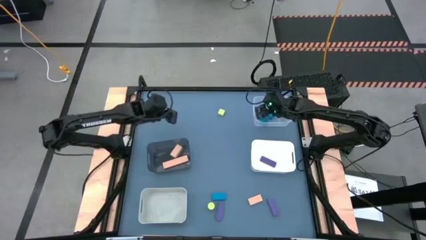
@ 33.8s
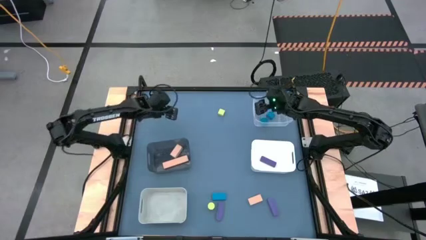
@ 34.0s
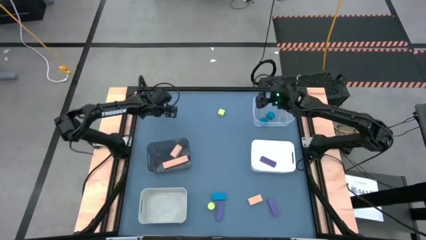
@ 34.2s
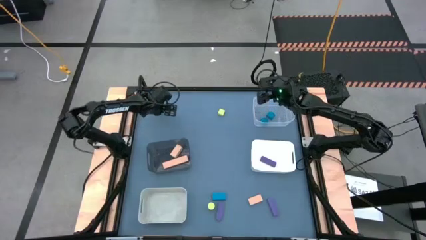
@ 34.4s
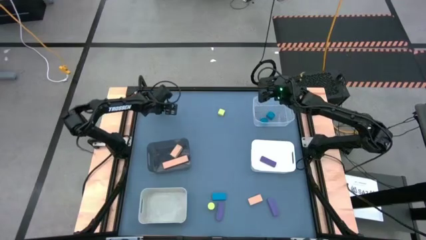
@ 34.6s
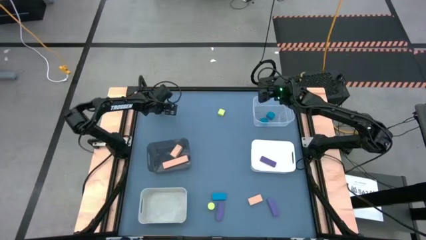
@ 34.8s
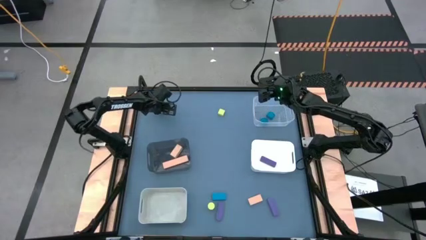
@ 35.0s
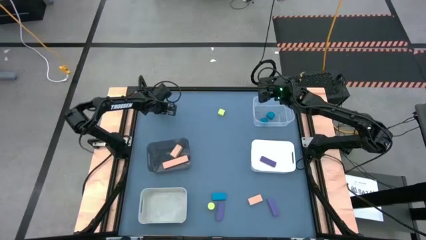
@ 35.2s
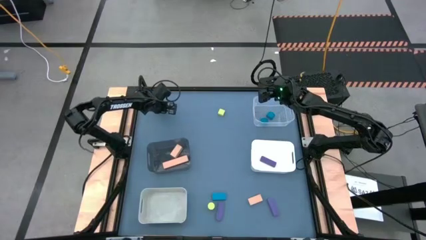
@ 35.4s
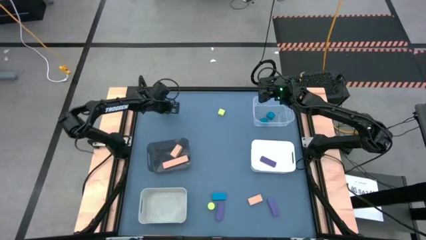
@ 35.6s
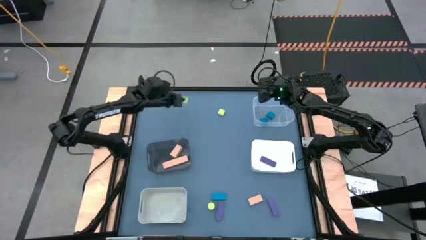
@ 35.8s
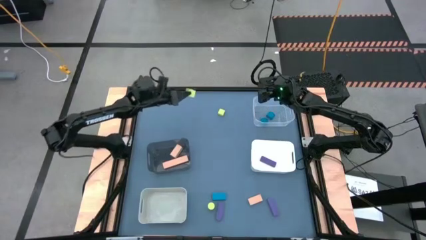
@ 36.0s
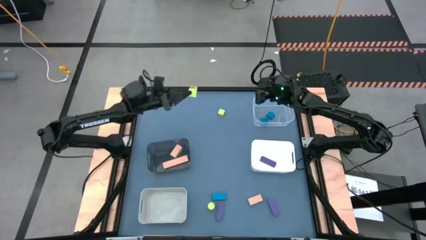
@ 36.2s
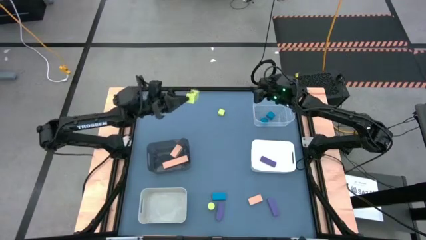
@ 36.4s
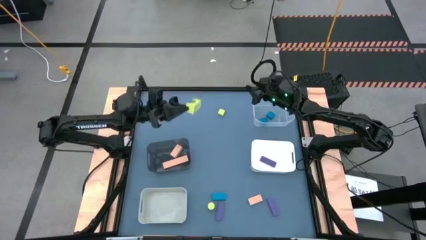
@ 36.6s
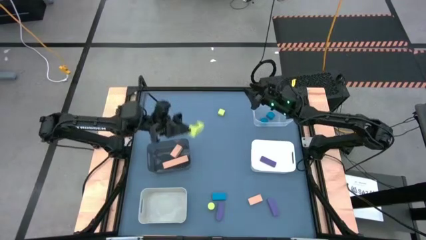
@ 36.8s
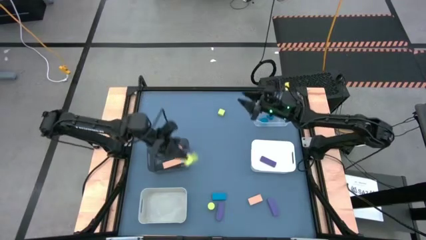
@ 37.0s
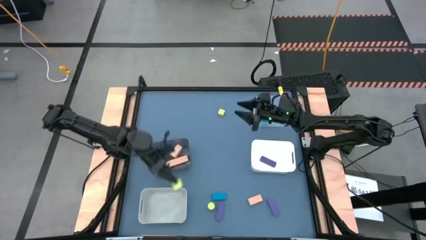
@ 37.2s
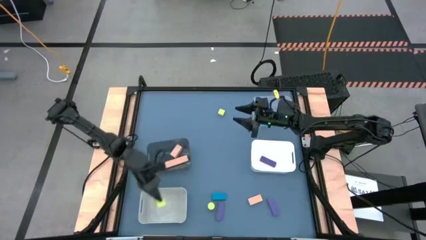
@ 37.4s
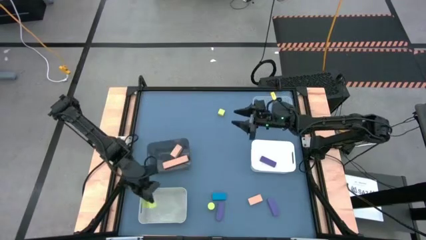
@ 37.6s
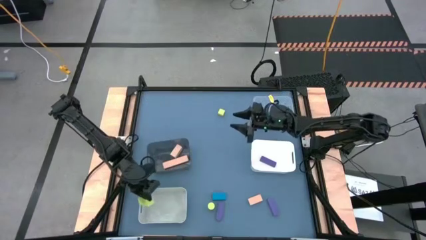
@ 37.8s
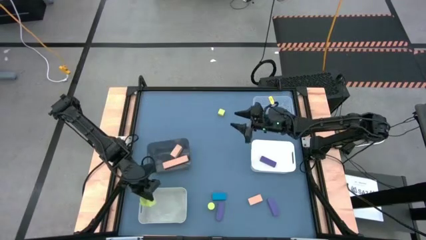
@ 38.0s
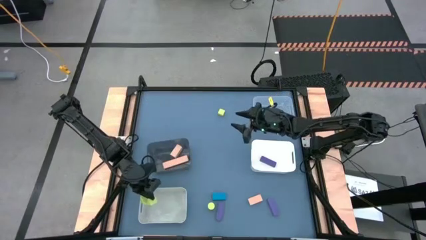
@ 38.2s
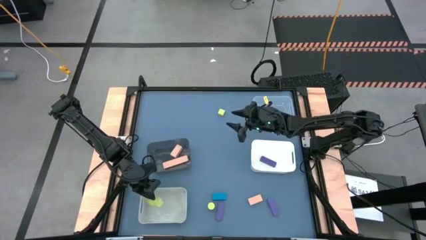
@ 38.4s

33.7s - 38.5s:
Task: Sort & place blocks by color
Put the top left yellow block into the gray bin

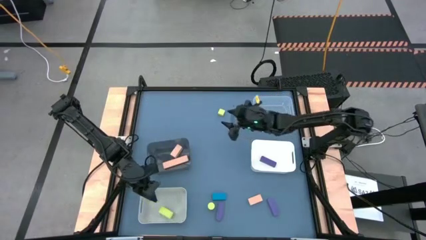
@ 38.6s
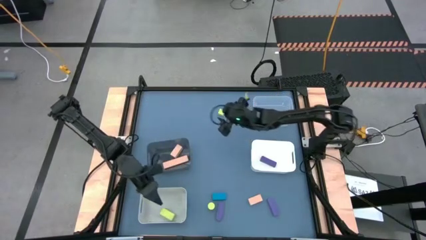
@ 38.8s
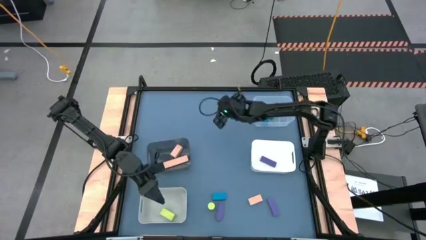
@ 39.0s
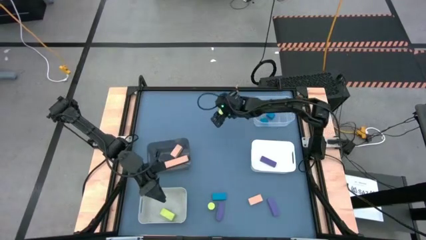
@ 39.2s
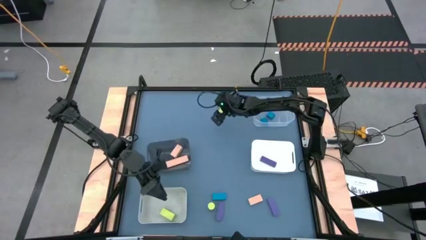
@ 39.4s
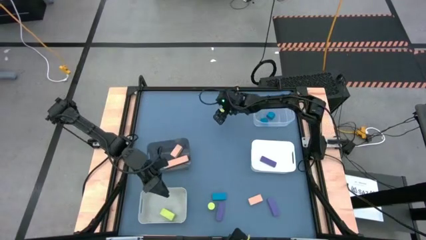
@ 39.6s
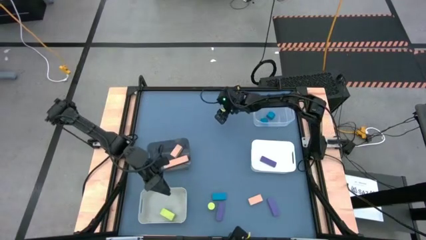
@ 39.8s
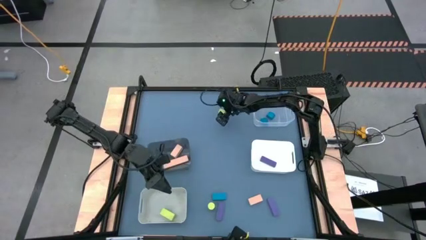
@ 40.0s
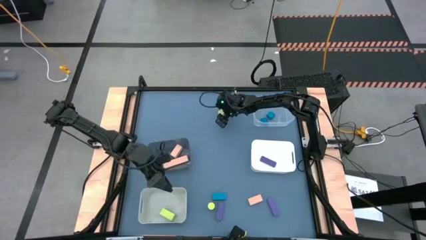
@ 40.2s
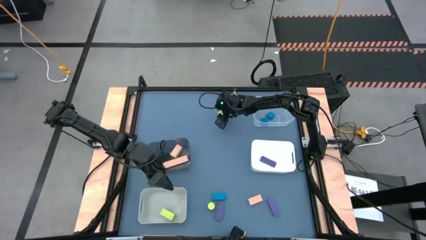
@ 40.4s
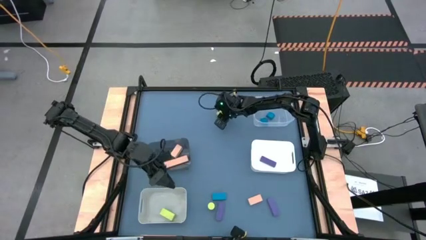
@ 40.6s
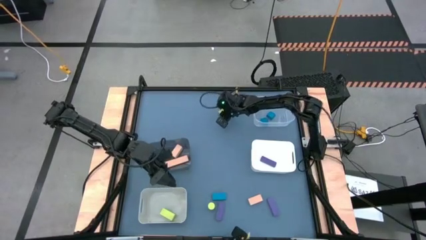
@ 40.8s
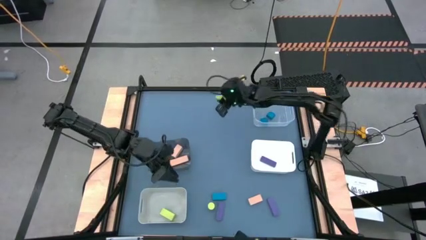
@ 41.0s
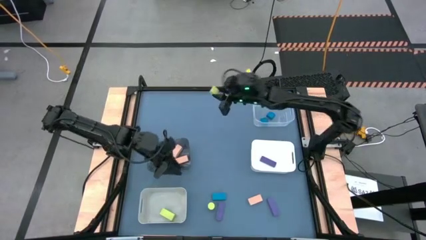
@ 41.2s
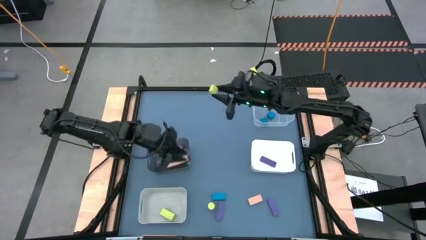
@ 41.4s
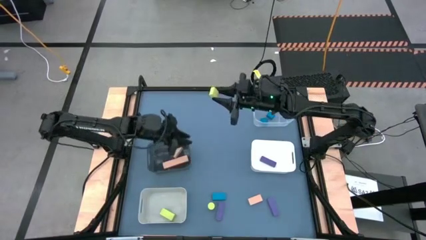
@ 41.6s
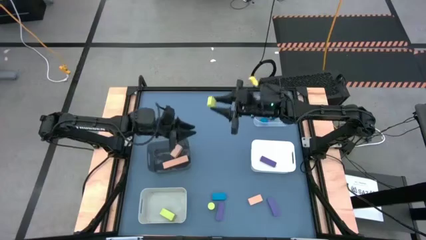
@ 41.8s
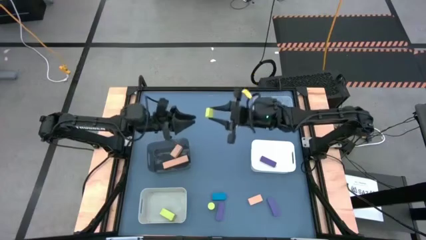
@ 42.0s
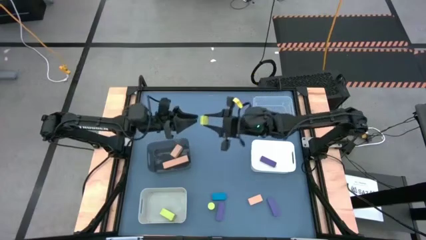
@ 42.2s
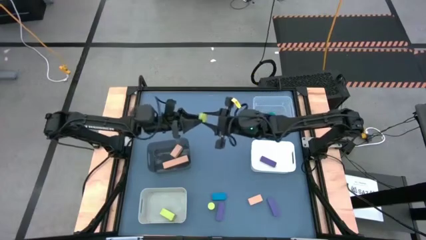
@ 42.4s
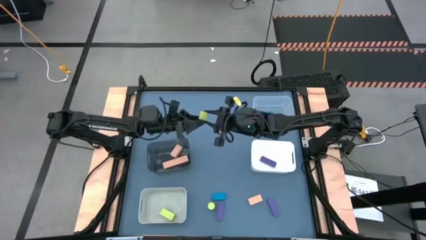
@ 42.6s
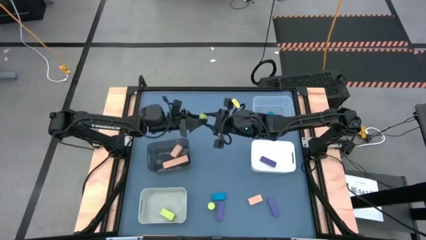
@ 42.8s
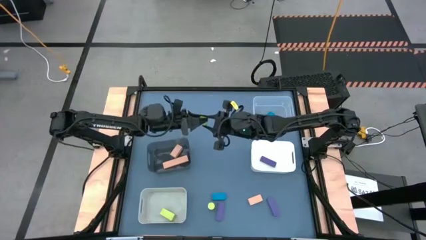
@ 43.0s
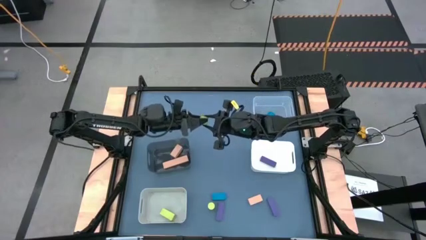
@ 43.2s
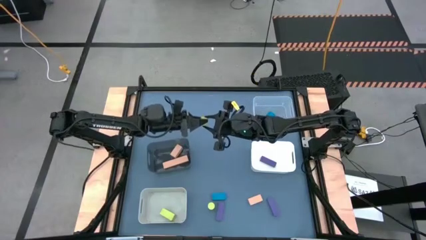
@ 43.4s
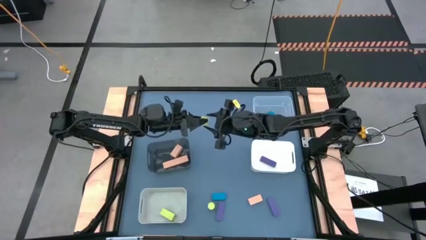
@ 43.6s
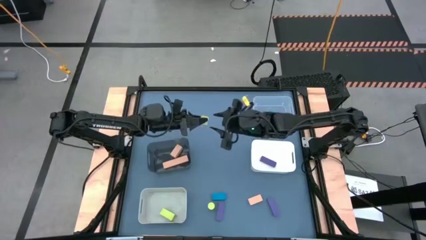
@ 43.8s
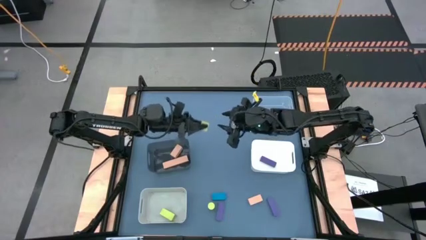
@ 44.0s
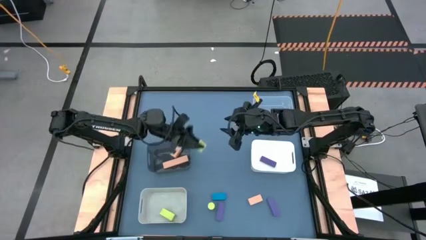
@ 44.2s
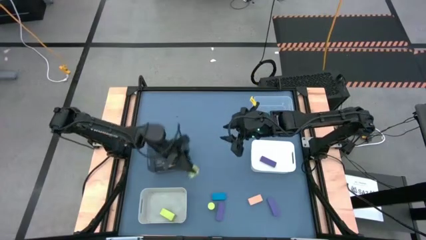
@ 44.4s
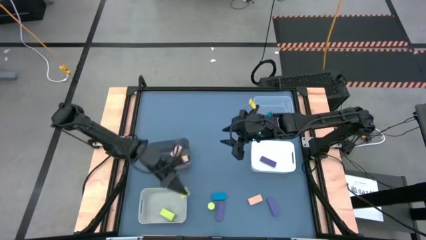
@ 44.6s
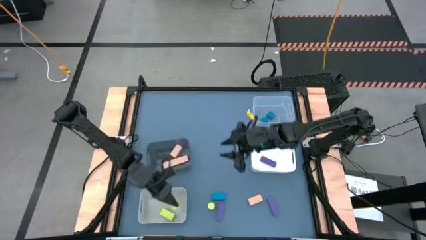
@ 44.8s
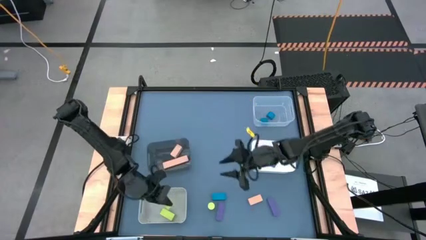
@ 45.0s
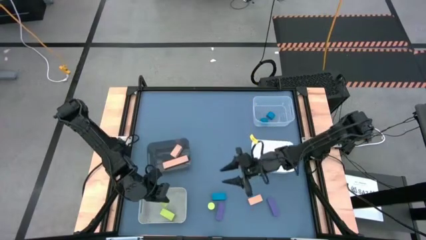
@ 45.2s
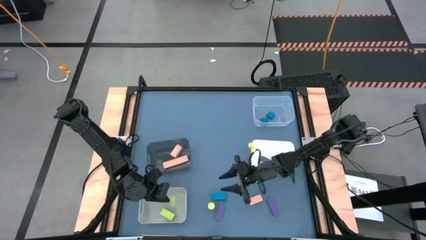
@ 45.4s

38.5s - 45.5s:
Put the top yellow block into the gray bin

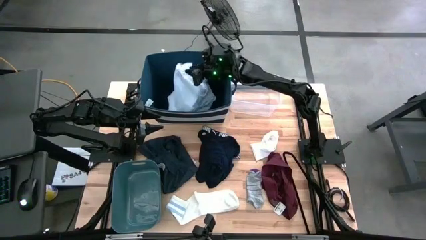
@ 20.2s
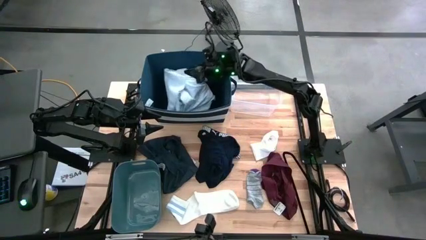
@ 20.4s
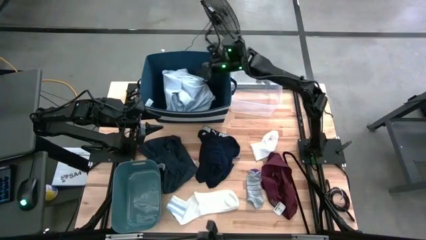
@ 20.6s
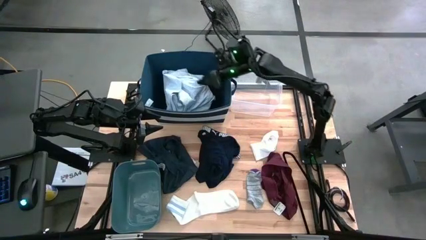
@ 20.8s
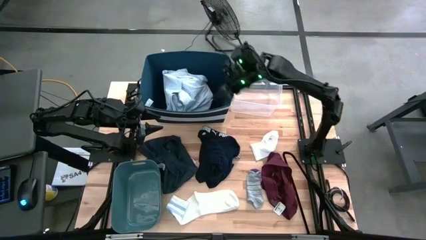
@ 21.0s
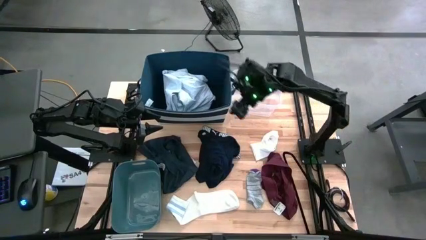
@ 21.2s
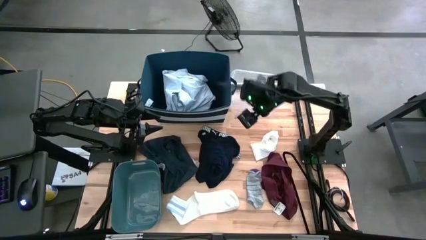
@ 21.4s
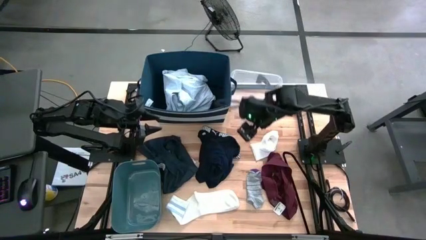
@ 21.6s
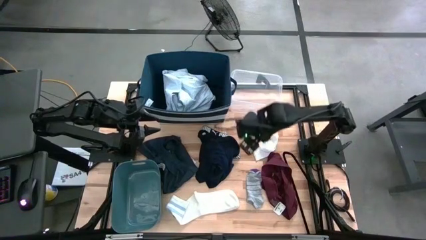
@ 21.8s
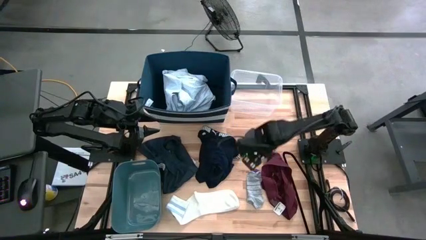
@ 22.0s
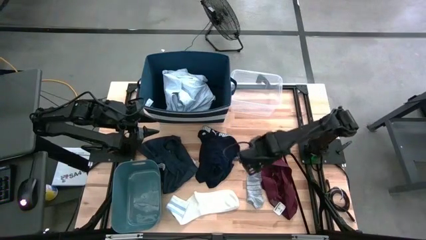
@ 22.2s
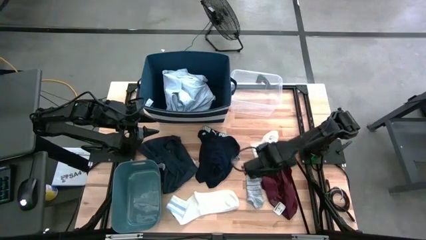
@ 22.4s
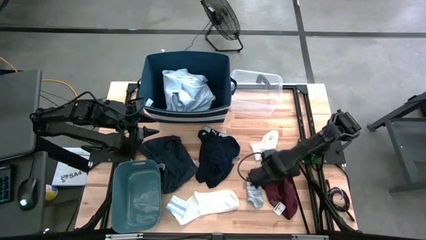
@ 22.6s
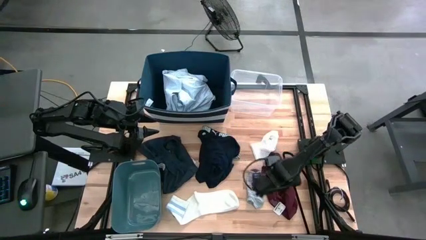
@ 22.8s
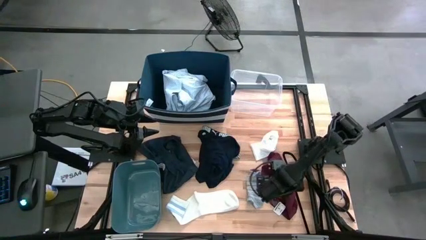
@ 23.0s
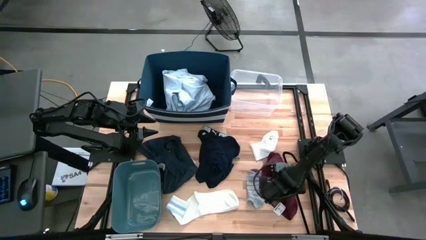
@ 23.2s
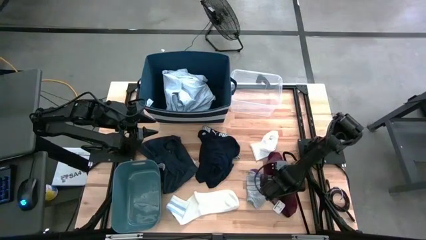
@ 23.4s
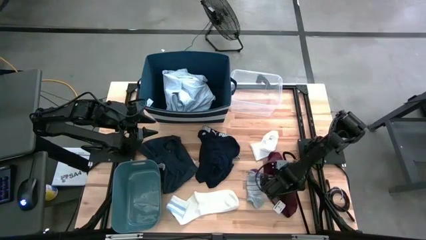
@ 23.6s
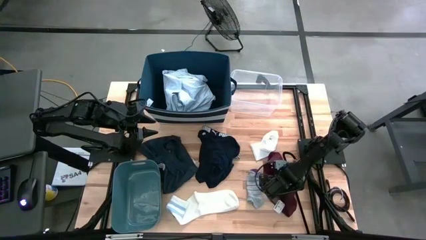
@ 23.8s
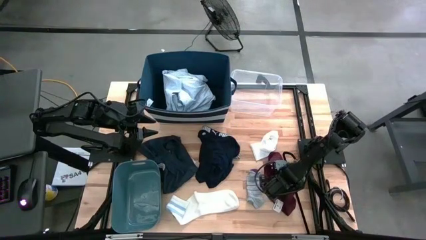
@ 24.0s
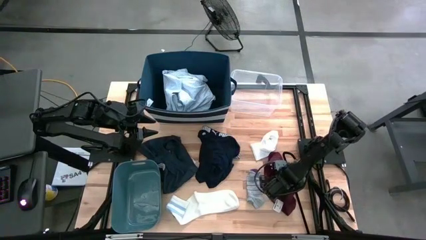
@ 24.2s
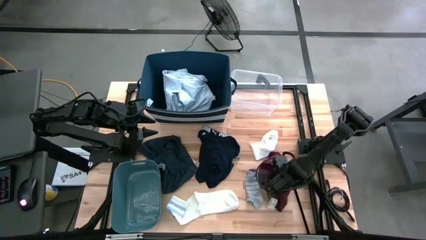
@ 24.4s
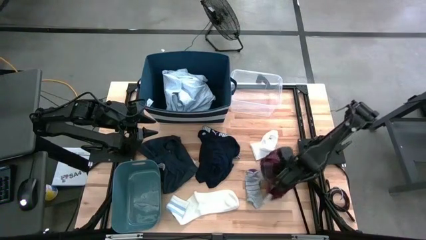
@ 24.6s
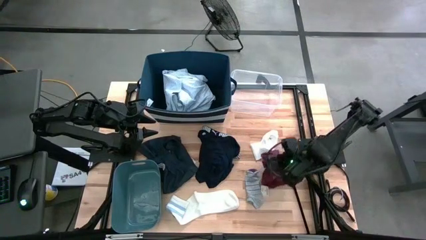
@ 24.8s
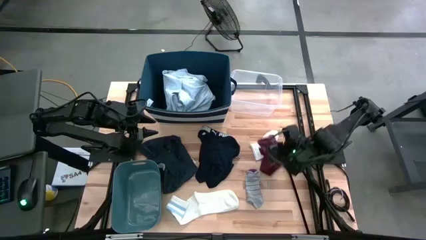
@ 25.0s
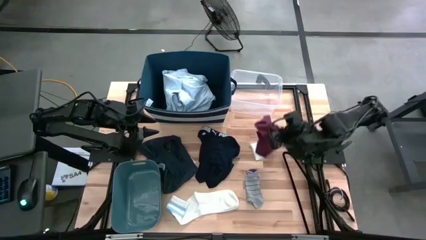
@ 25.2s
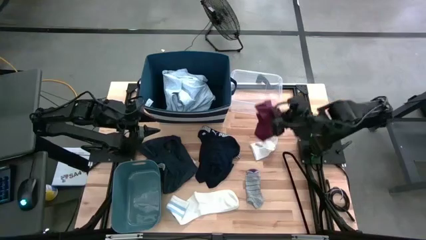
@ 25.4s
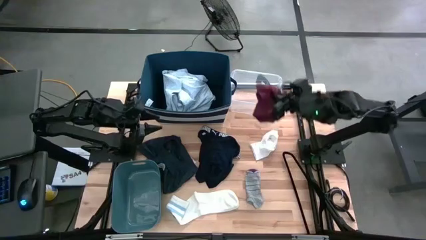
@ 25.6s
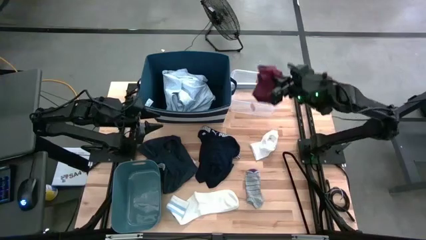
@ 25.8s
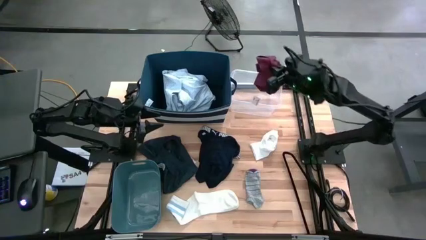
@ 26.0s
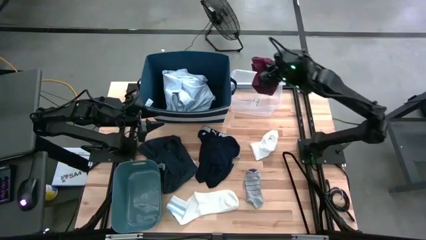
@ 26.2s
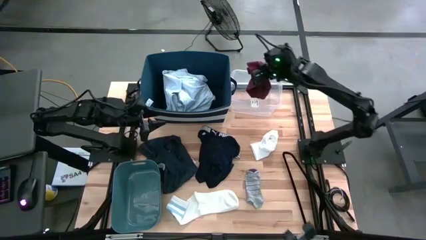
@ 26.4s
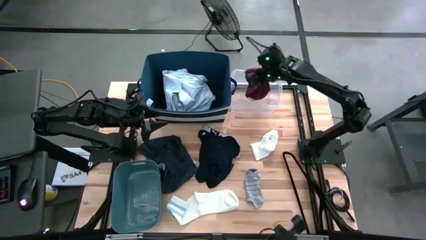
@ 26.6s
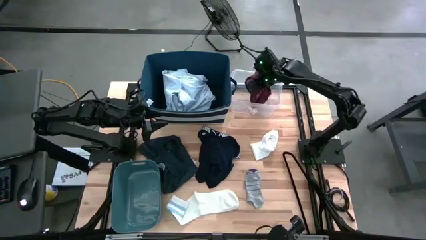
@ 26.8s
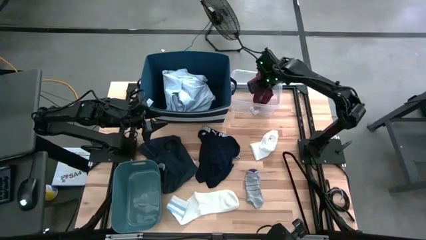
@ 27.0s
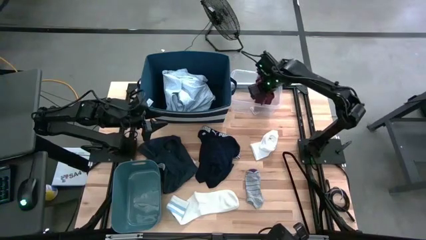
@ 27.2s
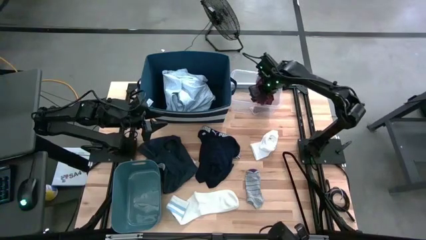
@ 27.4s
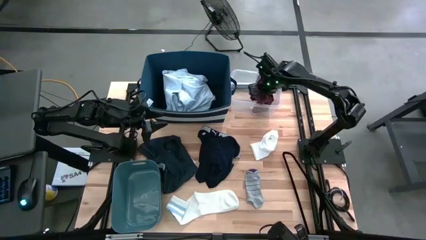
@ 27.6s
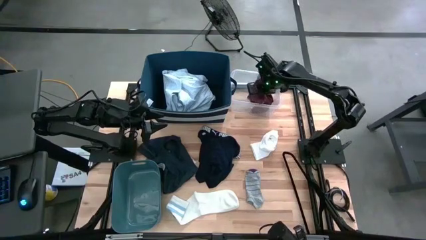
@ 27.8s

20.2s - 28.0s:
Task: Pick & Place Cloths
Put the red underwear into the transparent bin
